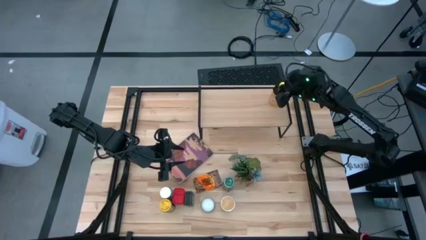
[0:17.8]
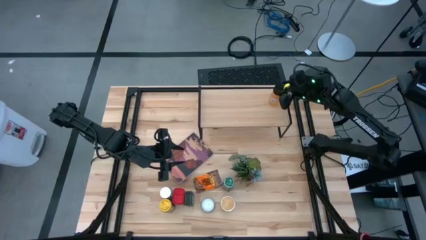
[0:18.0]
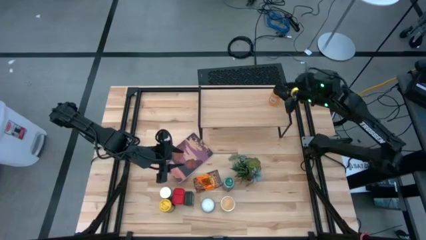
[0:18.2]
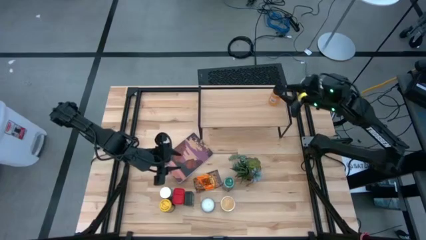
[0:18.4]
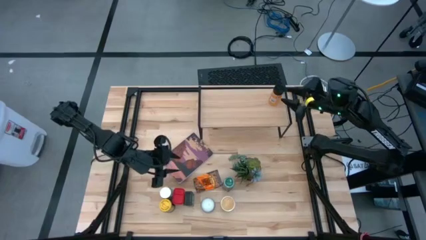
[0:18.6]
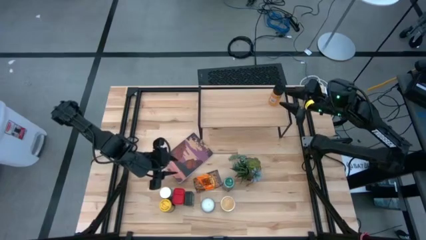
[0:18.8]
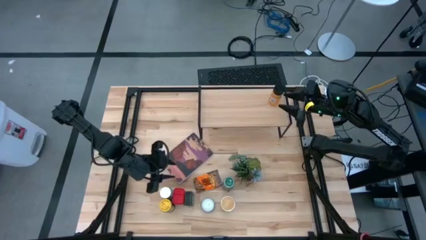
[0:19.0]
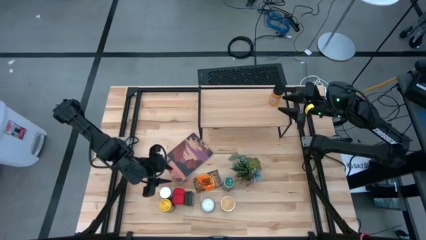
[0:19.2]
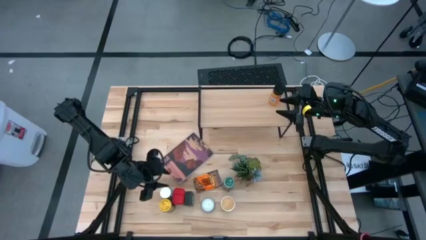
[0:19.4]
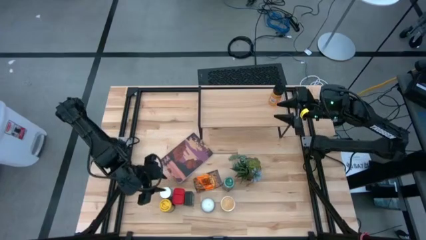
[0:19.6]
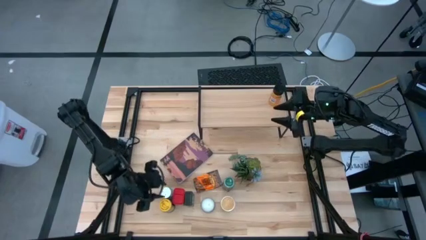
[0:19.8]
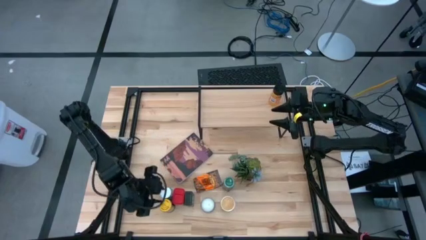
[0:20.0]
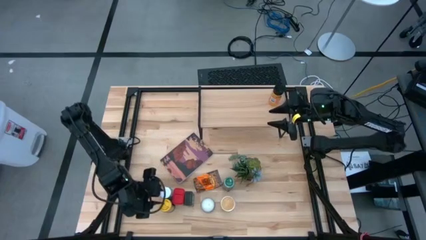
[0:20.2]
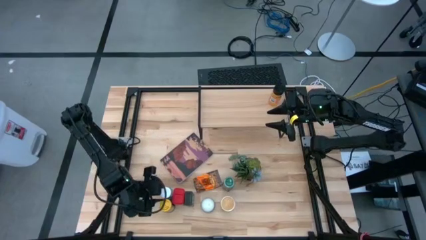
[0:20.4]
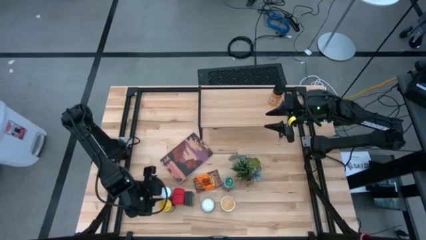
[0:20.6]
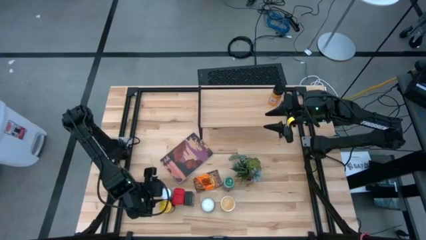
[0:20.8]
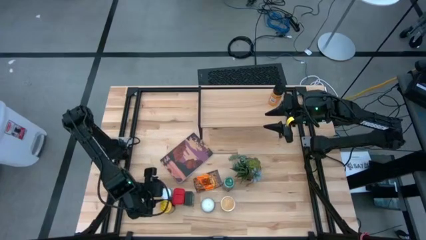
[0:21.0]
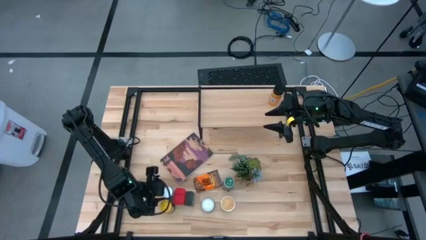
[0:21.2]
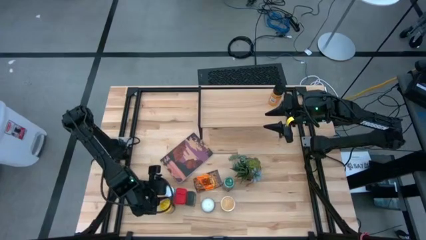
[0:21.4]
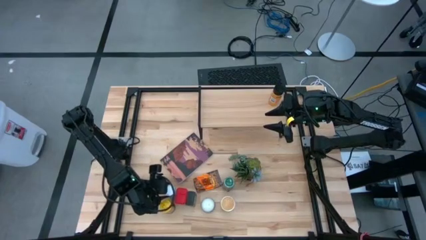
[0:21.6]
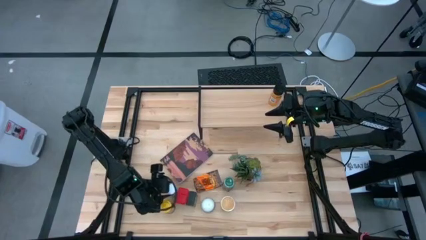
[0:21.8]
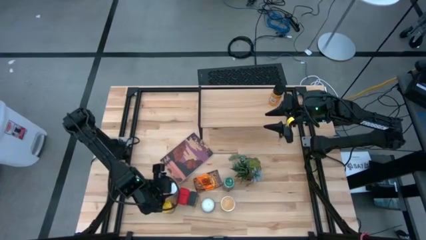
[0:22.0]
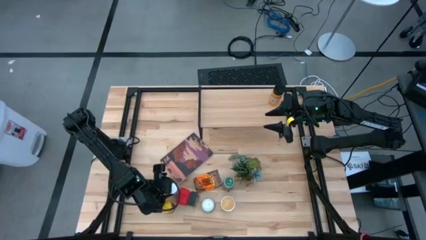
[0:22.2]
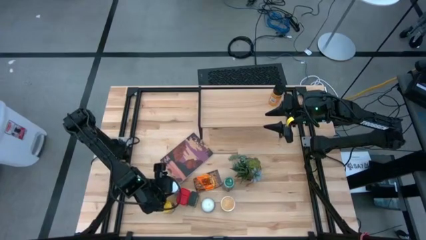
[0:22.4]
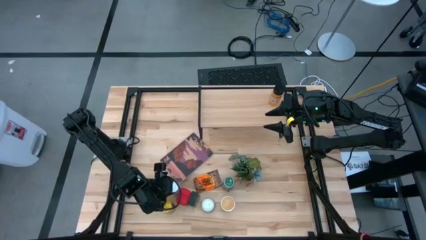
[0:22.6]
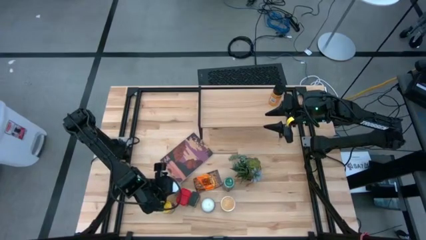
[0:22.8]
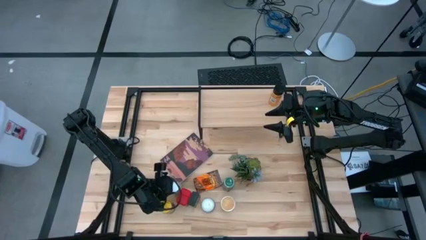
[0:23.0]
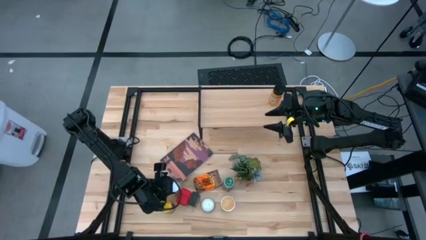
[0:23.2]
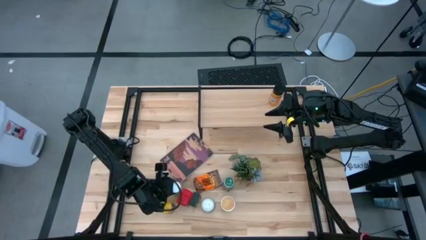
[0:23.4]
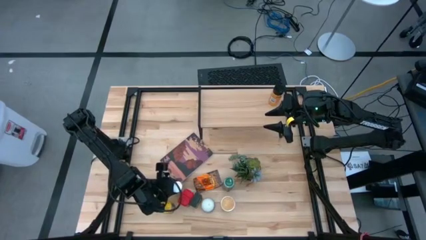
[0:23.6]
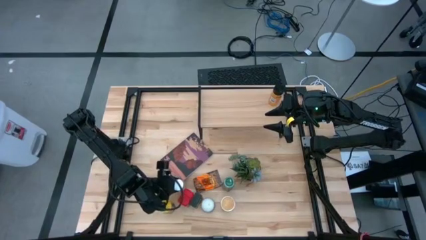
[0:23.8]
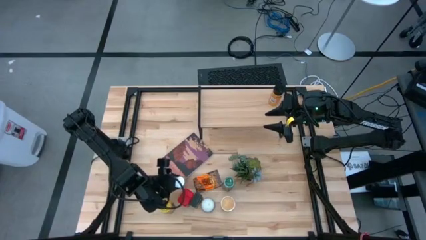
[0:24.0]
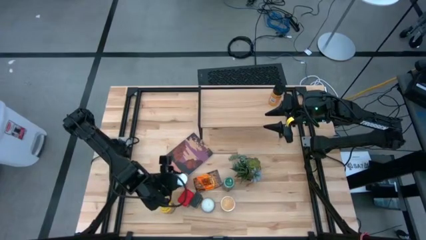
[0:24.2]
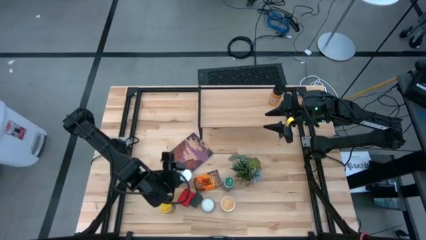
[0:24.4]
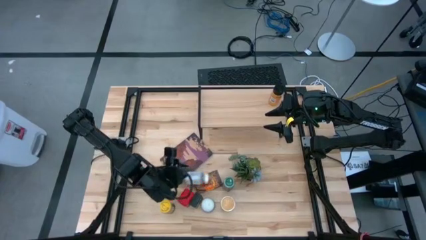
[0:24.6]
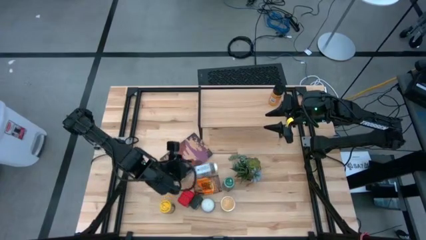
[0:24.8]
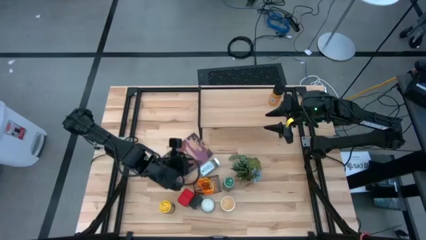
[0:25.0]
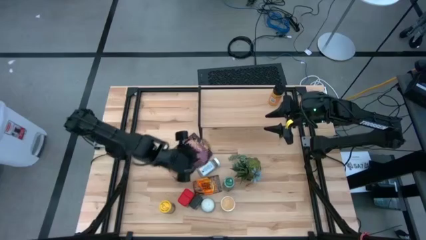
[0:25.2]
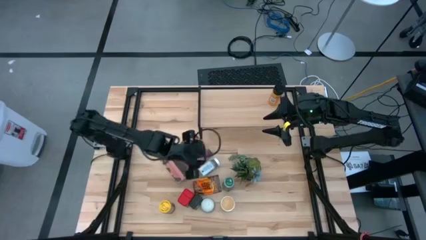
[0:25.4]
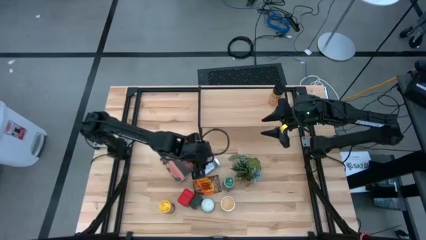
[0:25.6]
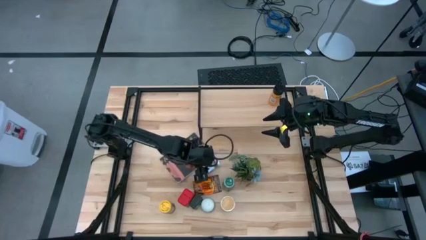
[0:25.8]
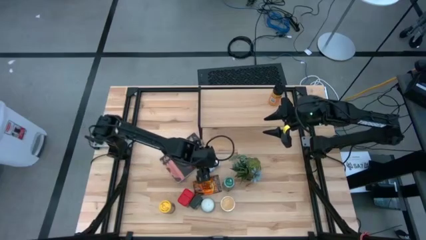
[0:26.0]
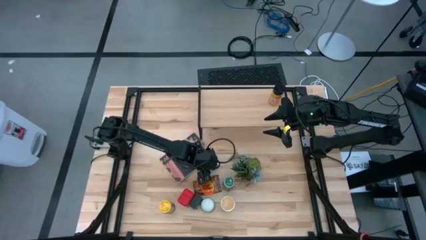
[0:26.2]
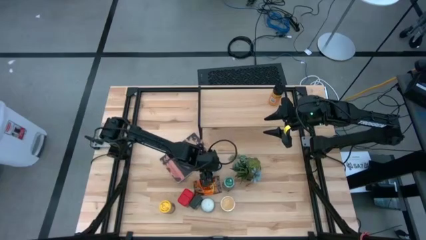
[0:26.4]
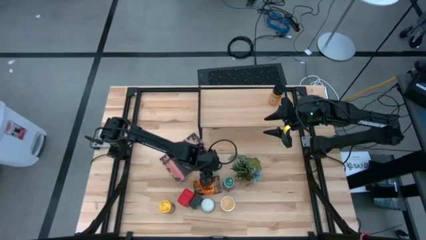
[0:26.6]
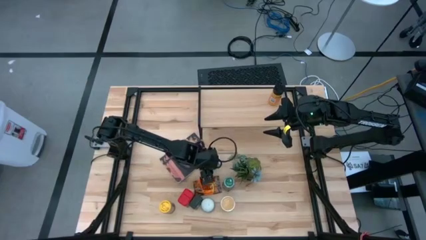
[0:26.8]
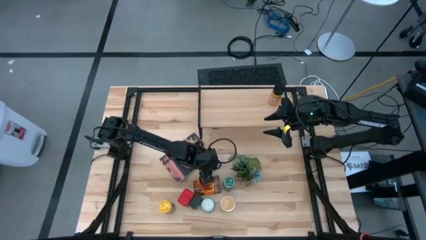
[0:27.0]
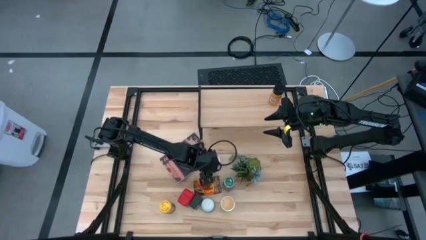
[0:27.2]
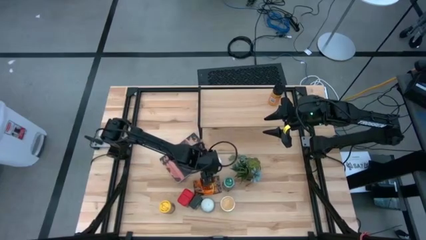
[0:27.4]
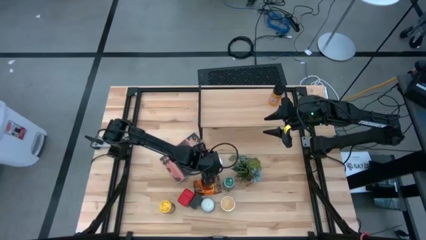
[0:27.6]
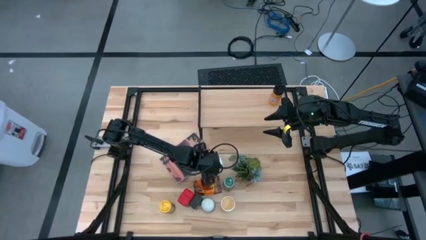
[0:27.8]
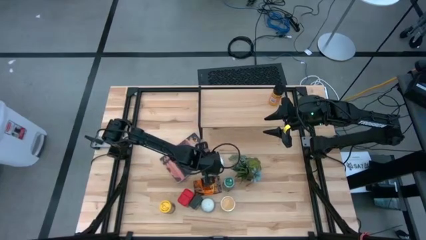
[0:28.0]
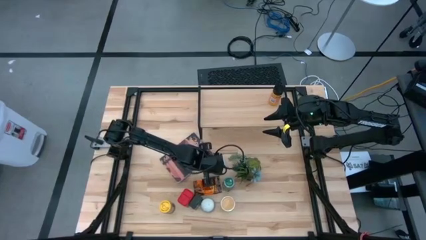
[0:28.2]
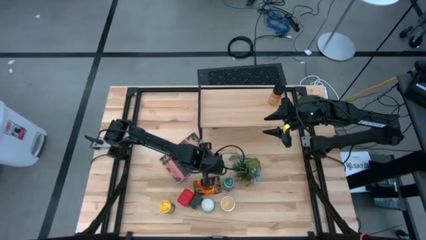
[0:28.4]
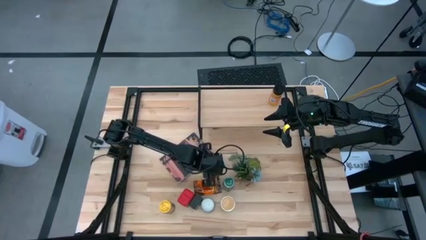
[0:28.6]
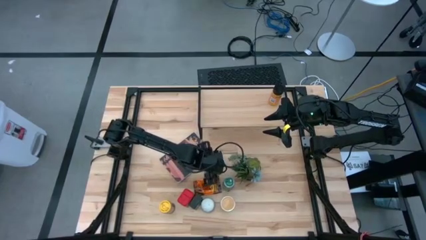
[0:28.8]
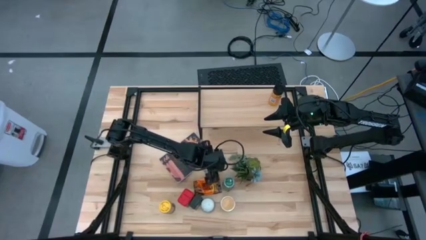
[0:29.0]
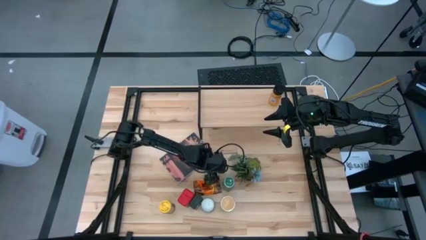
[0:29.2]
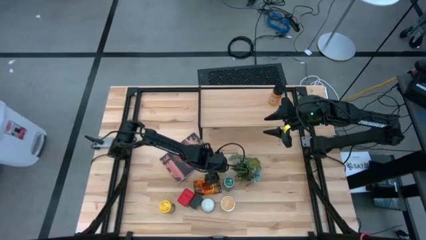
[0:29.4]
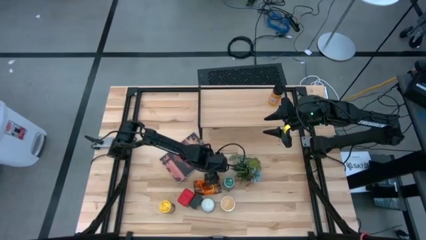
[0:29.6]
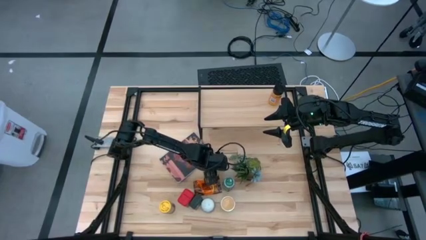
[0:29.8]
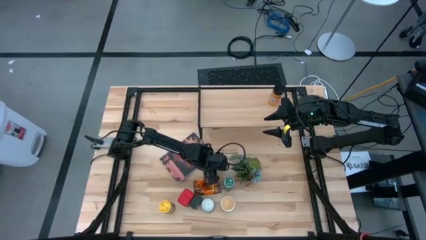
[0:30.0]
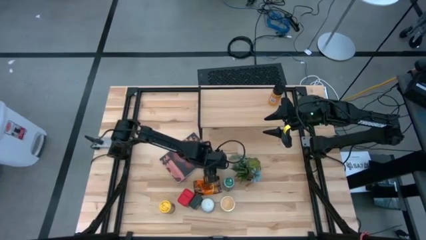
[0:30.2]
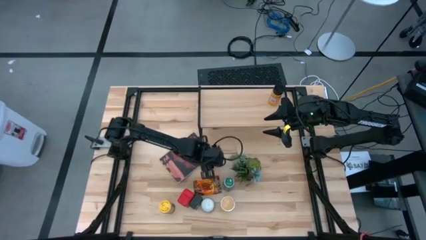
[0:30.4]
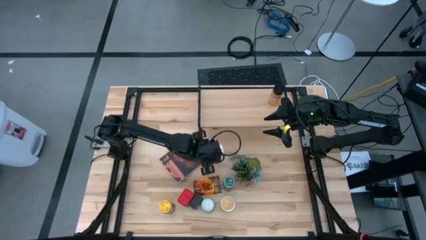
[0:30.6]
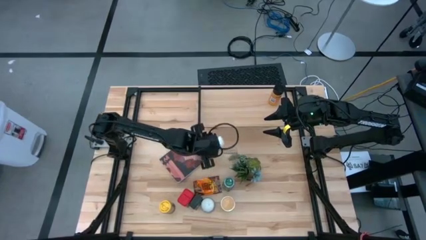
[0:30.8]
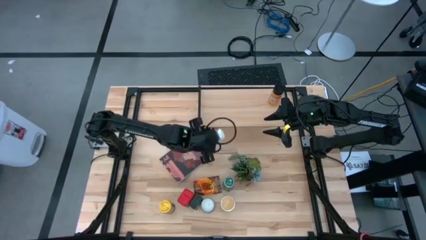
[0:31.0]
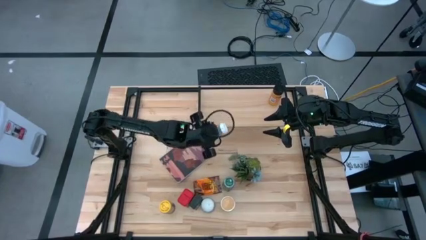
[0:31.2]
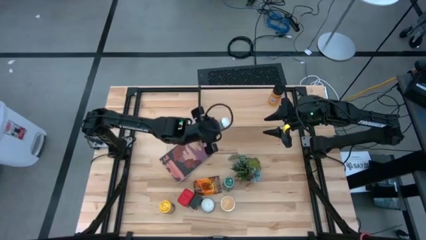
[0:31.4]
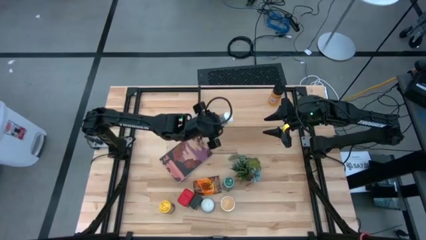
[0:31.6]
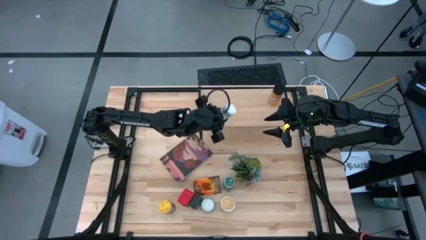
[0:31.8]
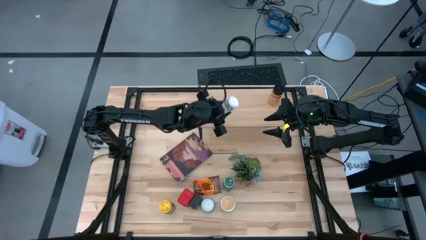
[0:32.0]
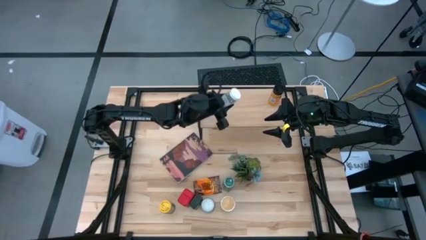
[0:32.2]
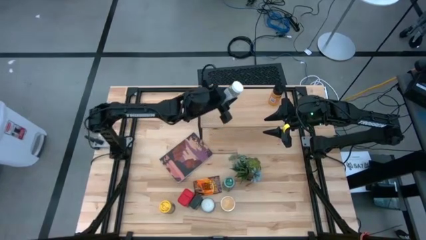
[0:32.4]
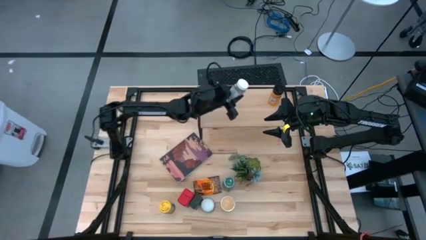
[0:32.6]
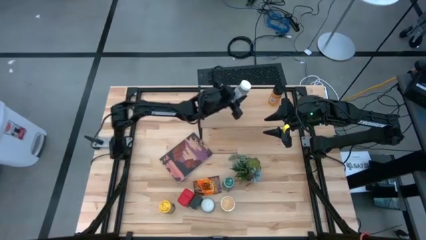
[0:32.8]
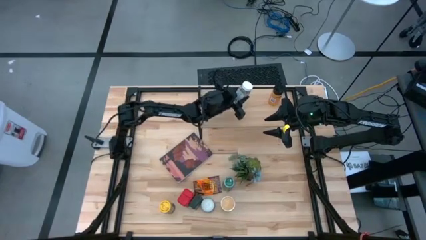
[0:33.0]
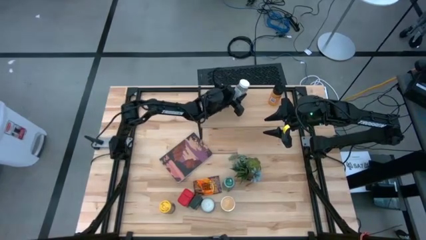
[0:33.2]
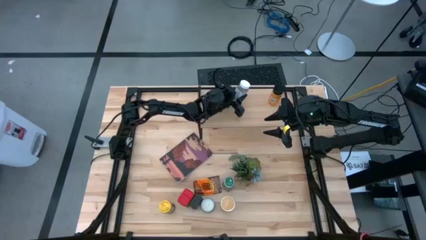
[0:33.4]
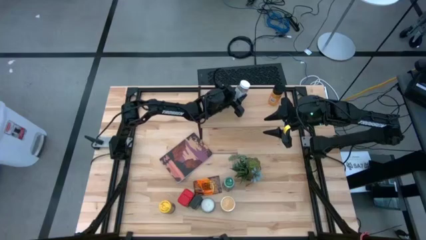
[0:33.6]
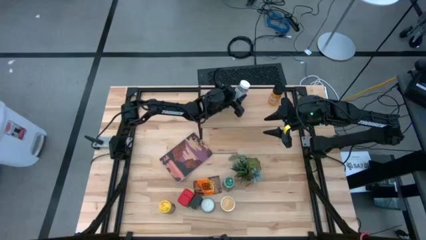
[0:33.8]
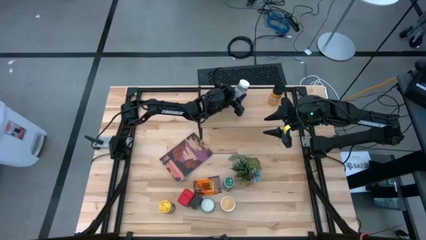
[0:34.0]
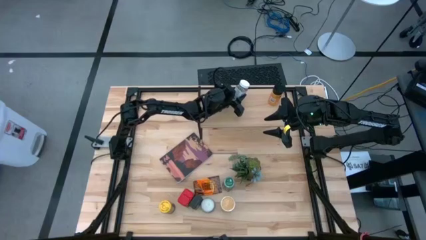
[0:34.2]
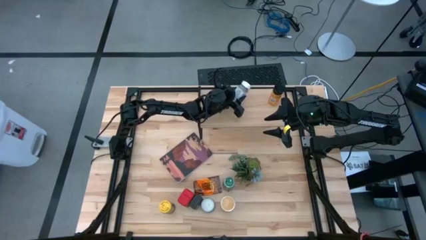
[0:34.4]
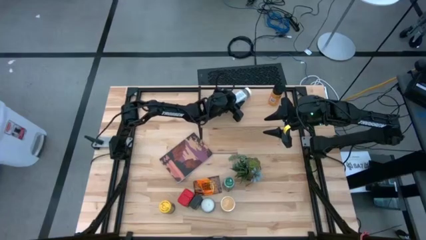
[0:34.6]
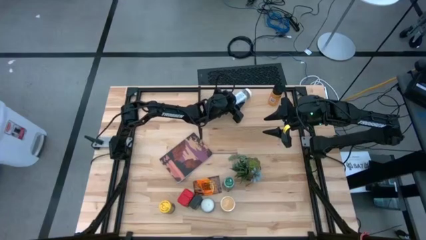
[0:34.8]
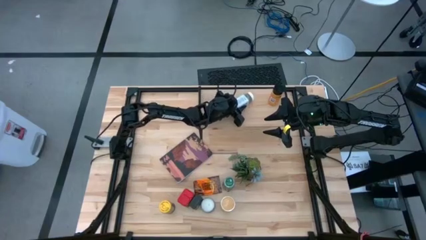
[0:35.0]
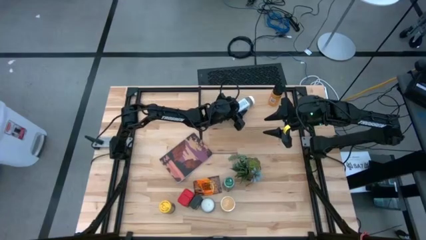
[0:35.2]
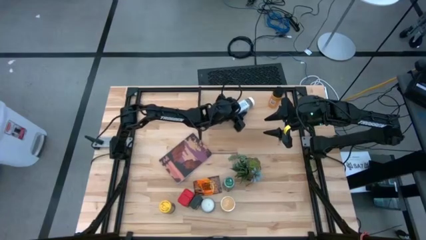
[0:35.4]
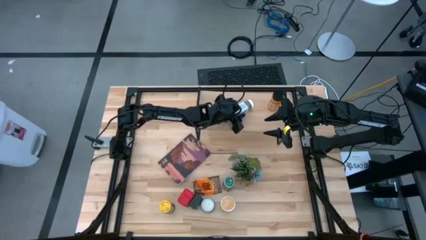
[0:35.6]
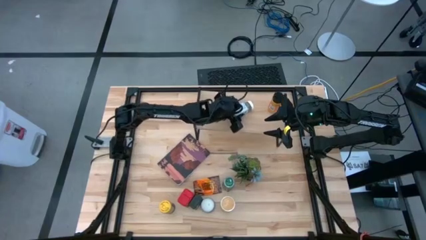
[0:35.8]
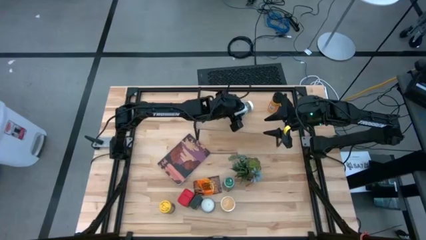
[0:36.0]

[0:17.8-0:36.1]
Task: Shelf spices
Put the white seasoning bottle on the shelf
